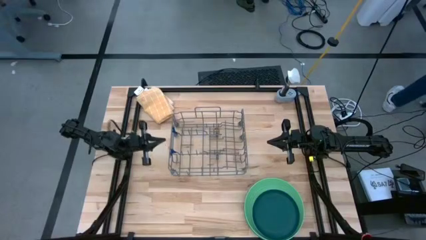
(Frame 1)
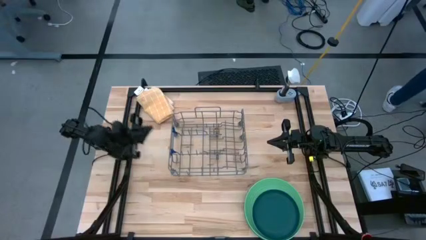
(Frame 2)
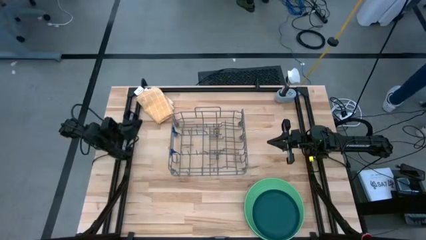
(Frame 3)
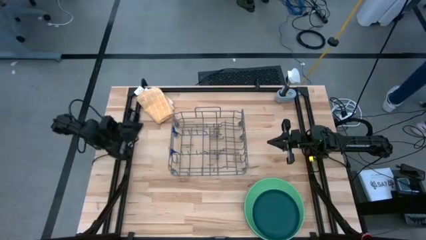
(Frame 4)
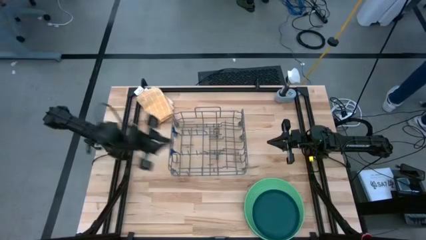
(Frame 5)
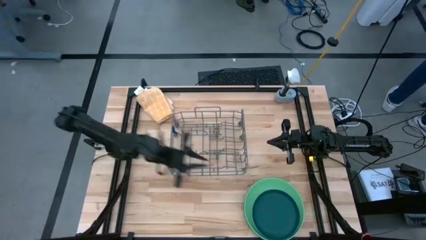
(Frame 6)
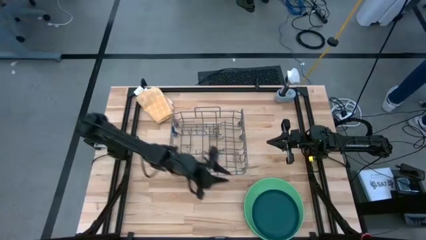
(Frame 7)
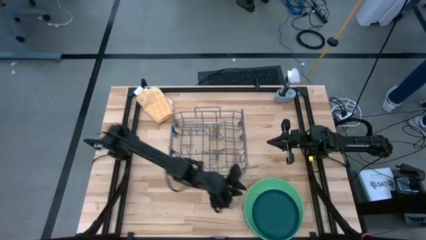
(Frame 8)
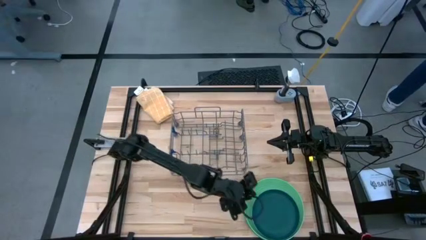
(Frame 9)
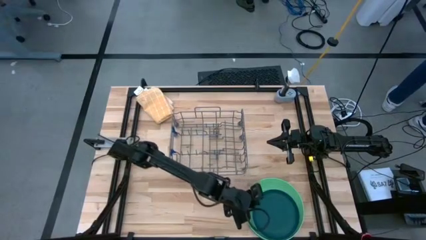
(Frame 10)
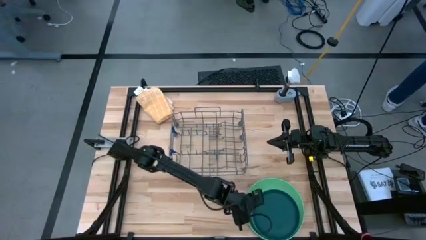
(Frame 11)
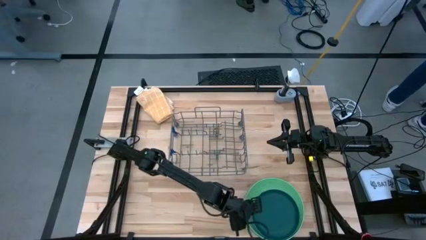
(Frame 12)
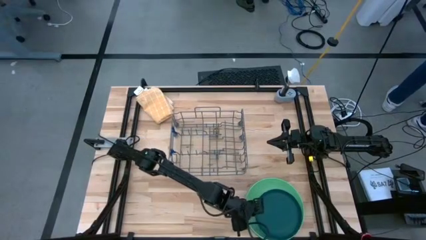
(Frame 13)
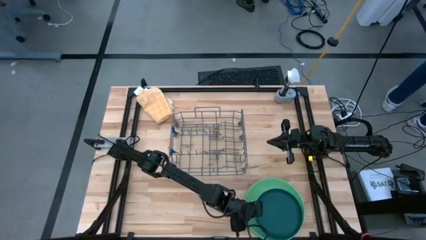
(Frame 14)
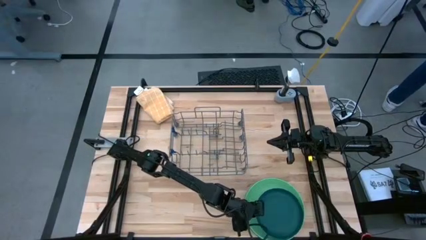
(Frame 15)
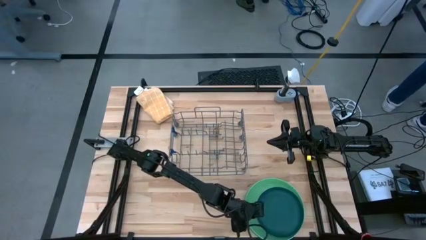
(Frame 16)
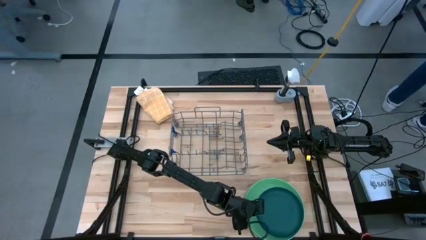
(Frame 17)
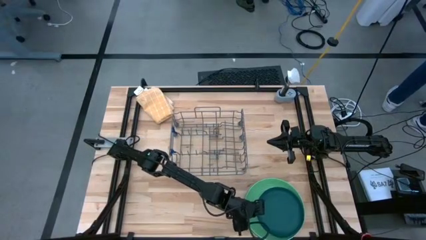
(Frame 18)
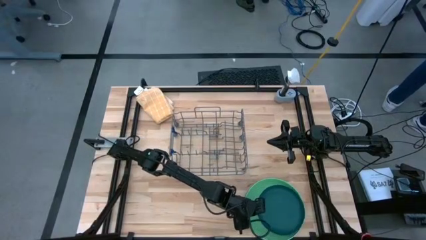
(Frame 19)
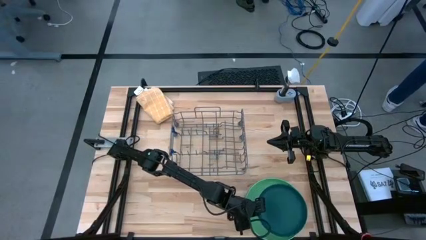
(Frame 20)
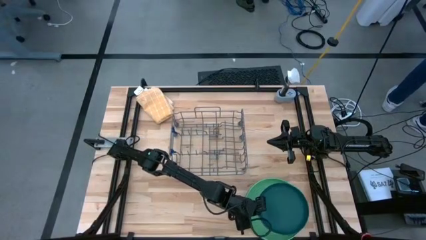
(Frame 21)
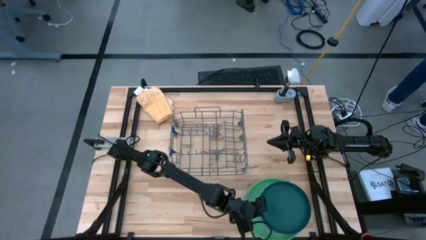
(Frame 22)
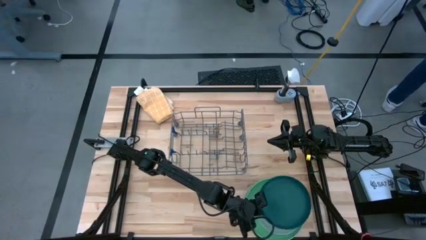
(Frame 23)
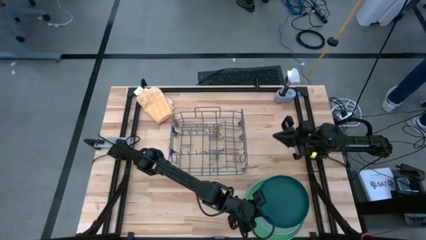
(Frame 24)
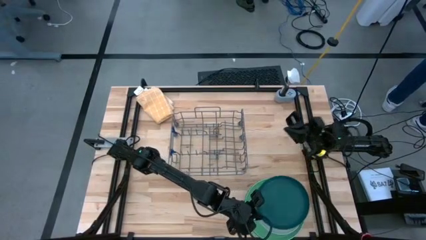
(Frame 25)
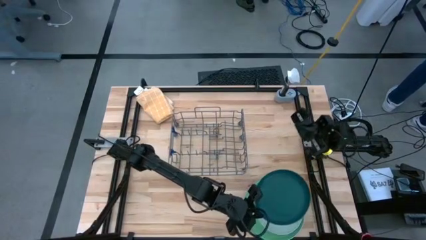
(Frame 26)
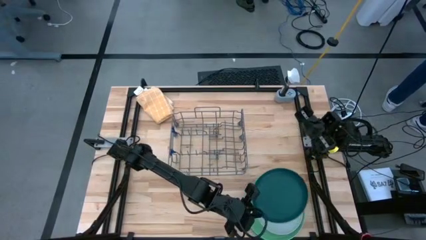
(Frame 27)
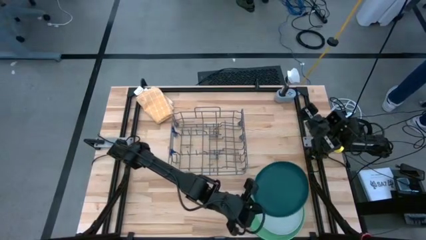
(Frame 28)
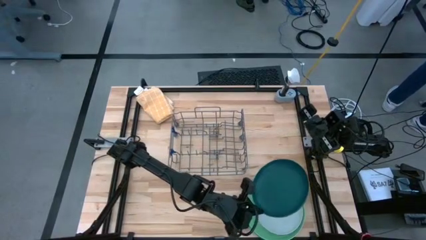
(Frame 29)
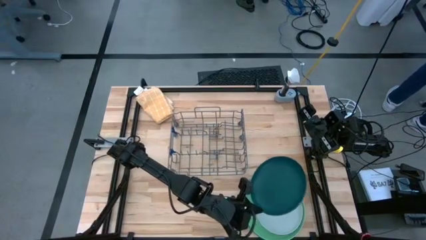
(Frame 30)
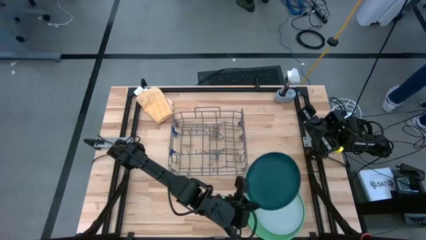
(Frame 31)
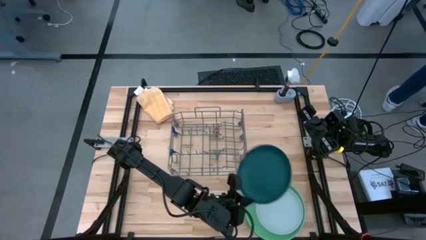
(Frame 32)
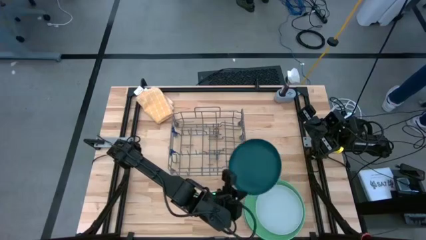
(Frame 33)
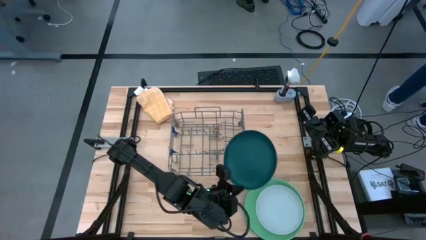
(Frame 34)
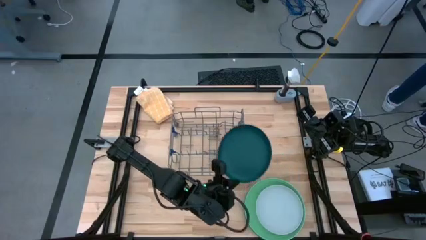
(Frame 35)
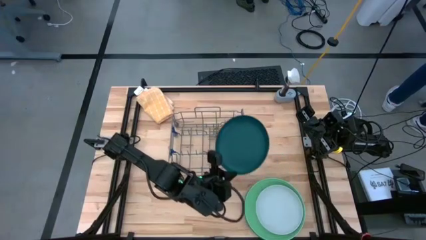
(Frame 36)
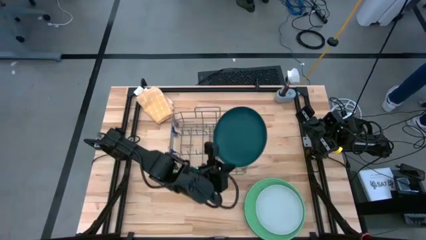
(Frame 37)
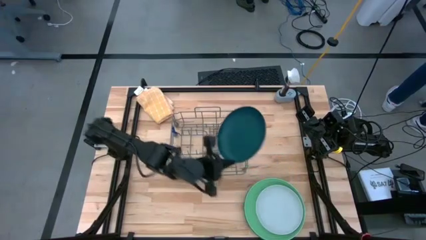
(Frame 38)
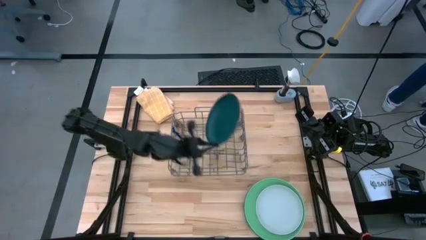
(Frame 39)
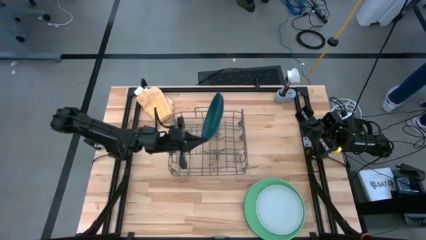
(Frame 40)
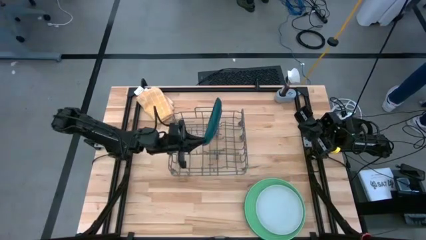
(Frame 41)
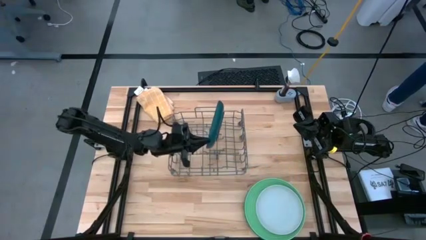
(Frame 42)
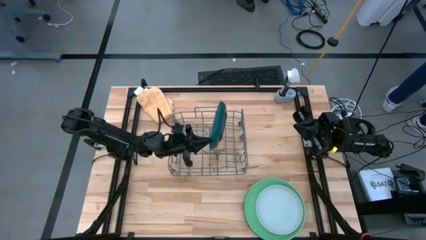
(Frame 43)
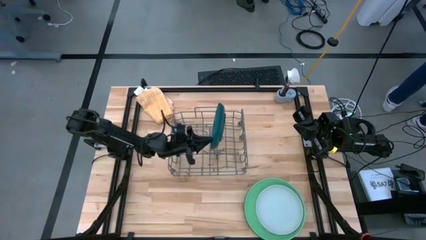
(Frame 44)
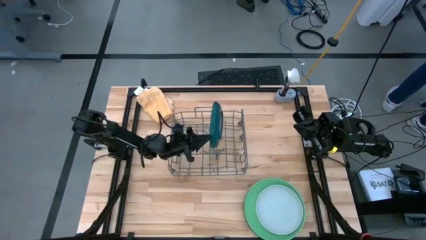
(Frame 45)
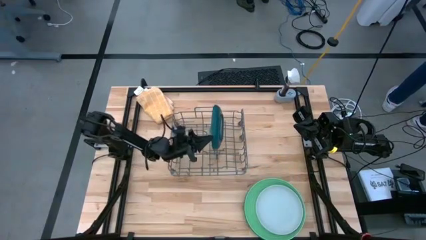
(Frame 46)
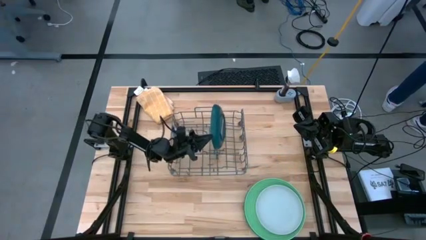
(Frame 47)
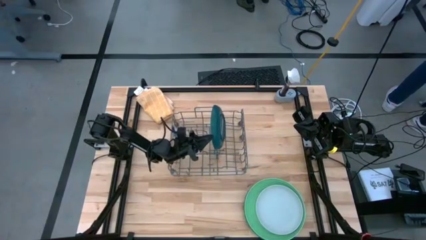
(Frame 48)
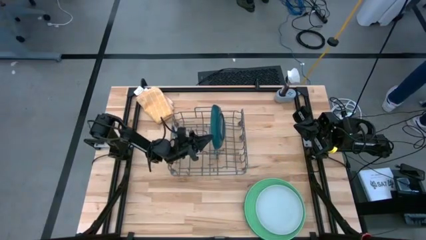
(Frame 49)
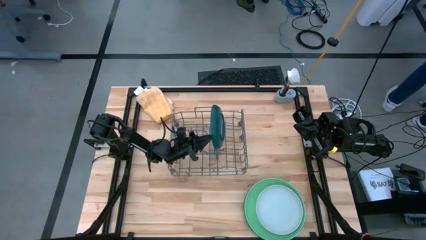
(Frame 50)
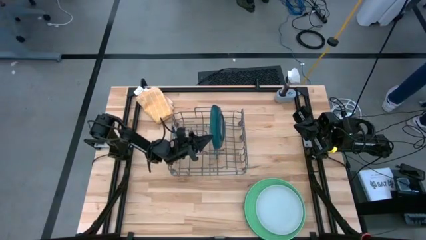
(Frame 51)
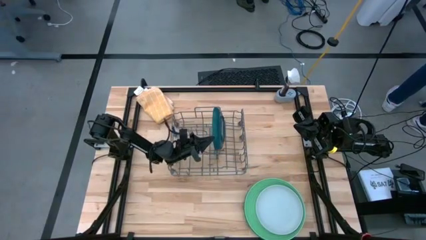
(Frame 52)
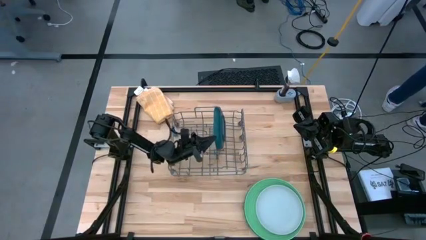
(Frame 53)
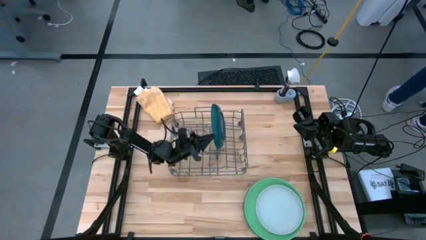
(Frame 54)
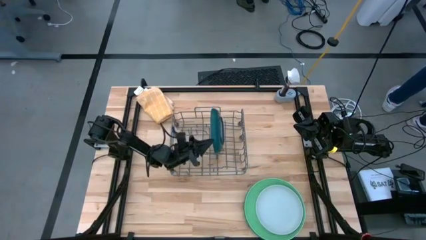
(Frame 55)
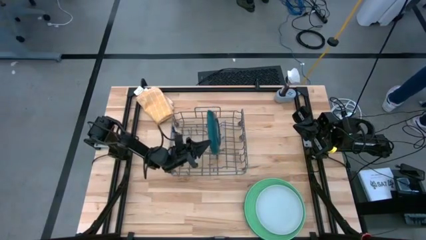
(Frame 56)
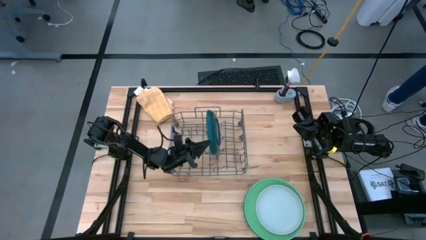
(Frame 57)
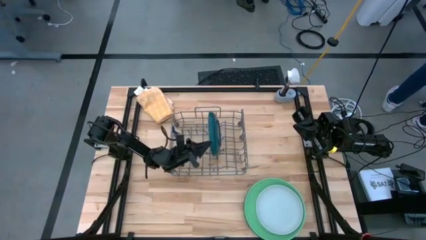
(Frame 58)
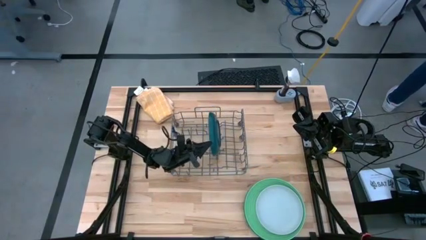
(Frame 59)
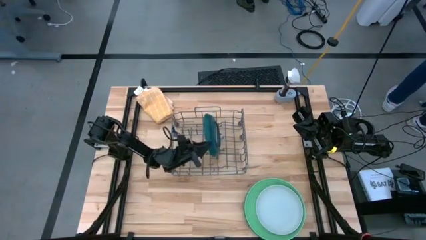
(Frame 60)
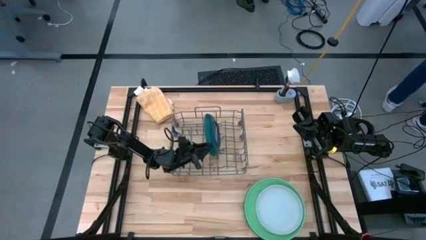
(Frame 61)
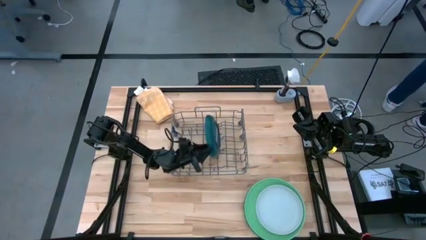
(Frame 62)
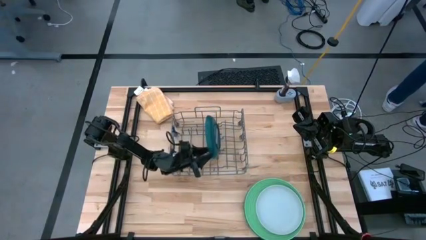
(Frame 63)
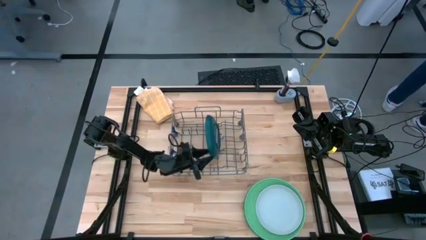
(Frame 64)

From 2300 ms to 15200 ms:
Task: Sort dishes
Put the green plate in the dish rack
